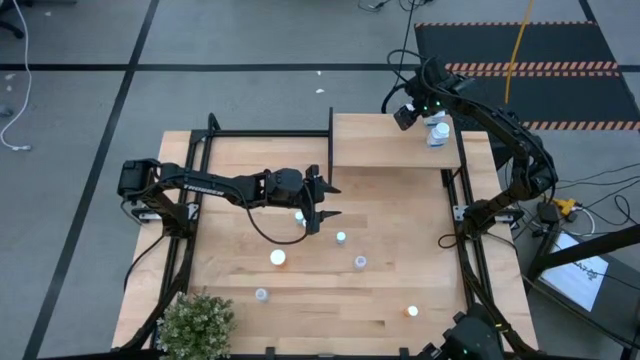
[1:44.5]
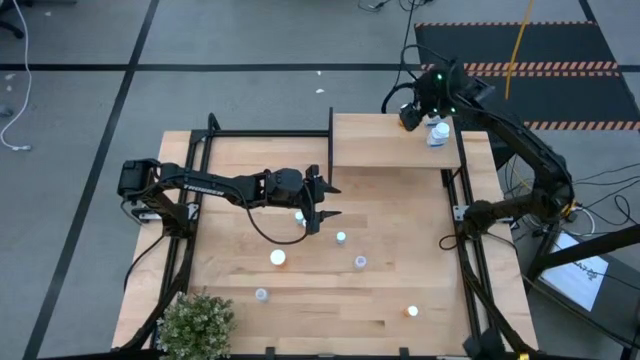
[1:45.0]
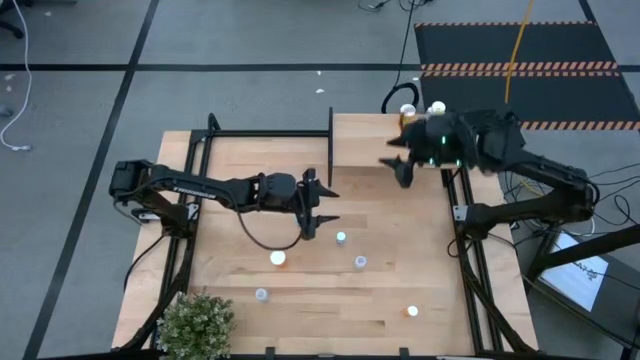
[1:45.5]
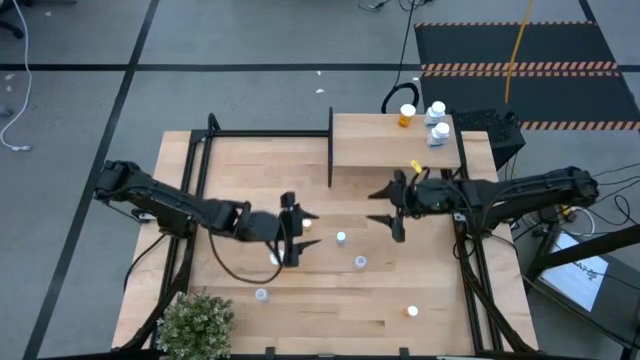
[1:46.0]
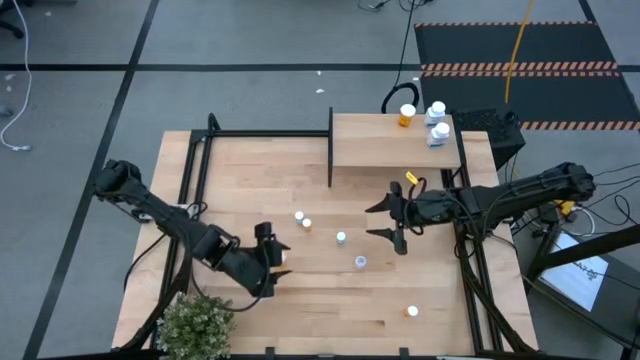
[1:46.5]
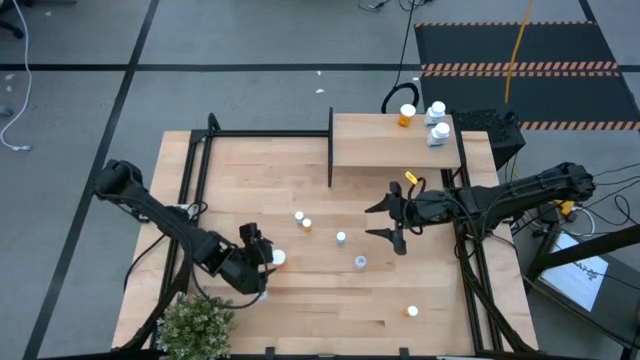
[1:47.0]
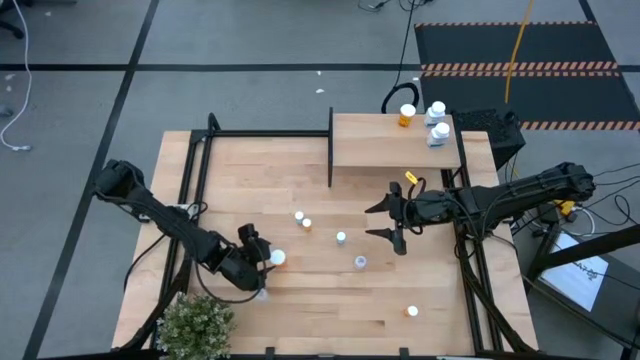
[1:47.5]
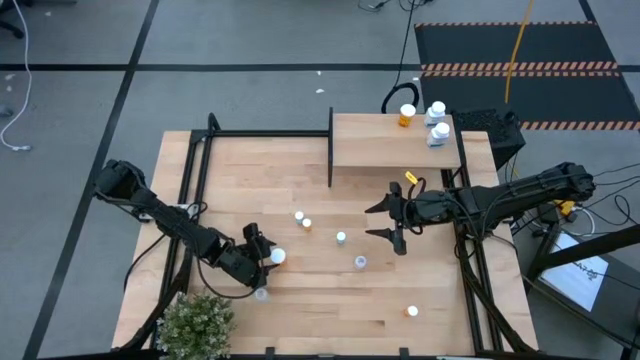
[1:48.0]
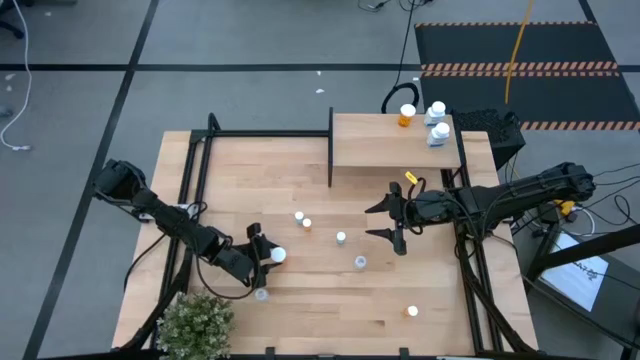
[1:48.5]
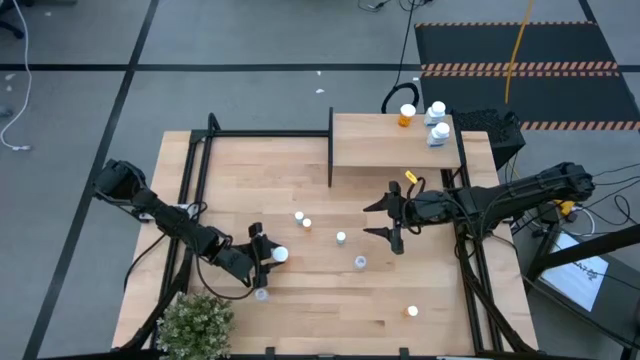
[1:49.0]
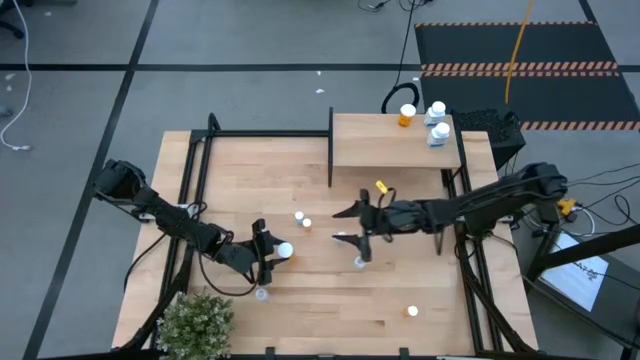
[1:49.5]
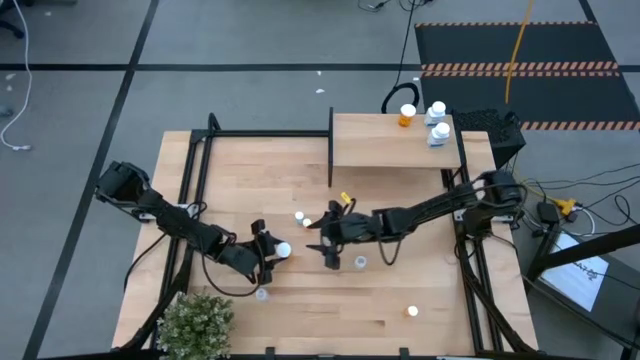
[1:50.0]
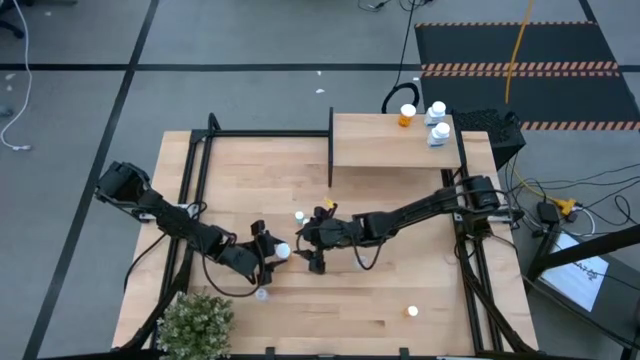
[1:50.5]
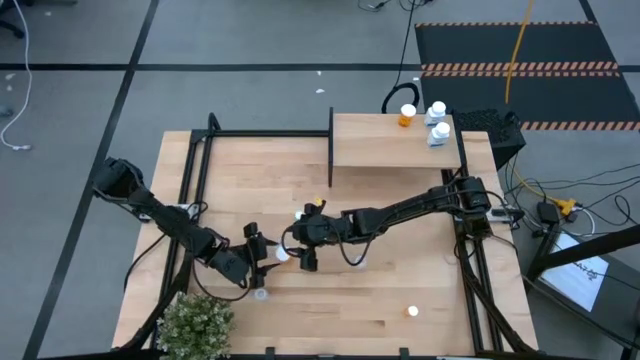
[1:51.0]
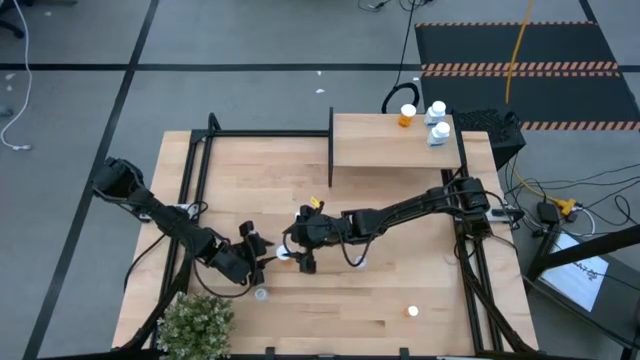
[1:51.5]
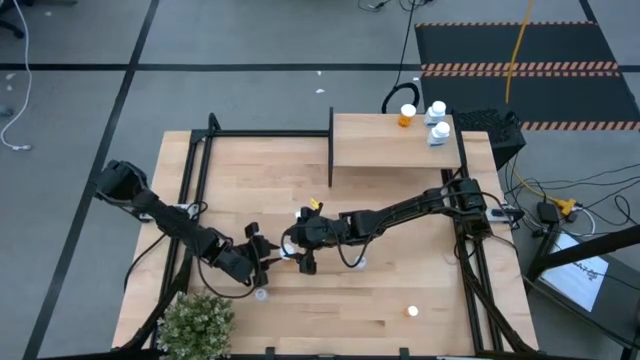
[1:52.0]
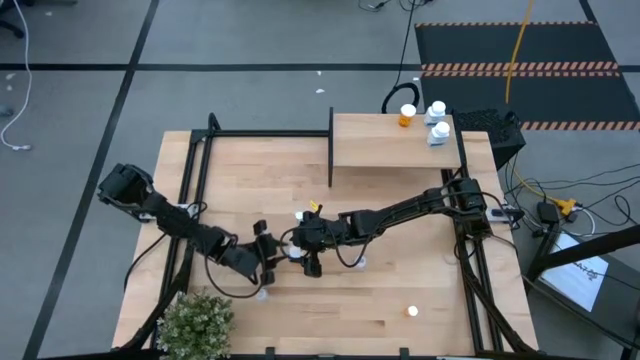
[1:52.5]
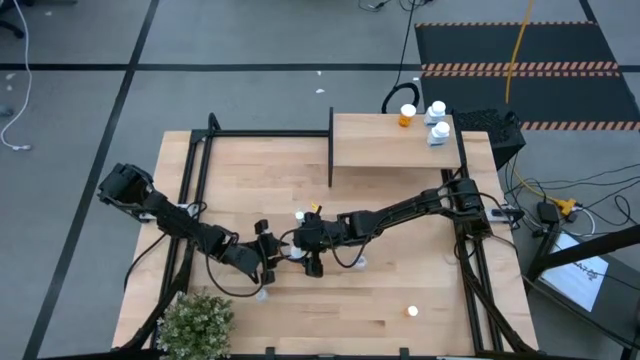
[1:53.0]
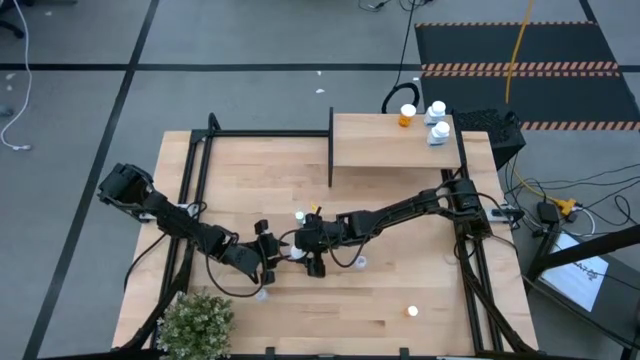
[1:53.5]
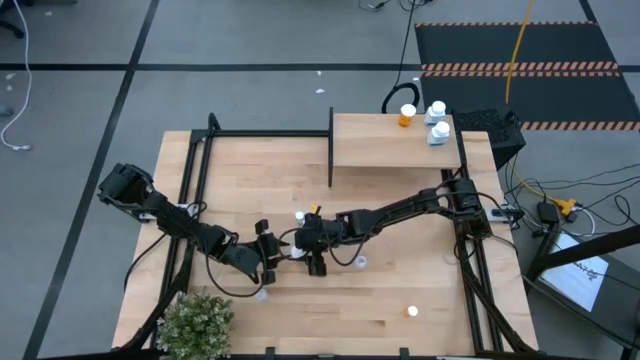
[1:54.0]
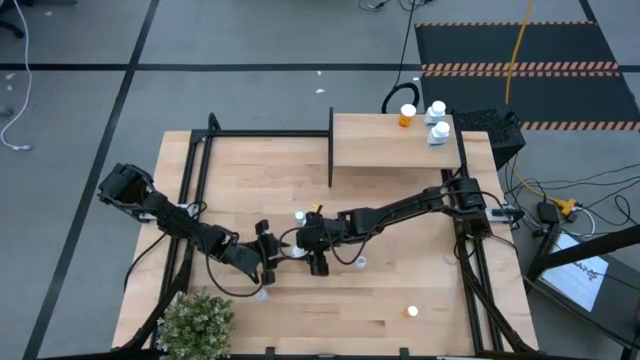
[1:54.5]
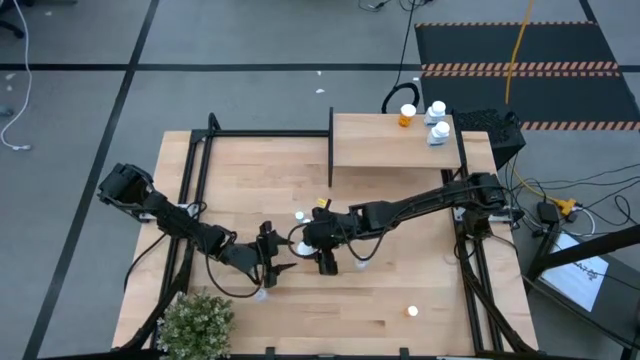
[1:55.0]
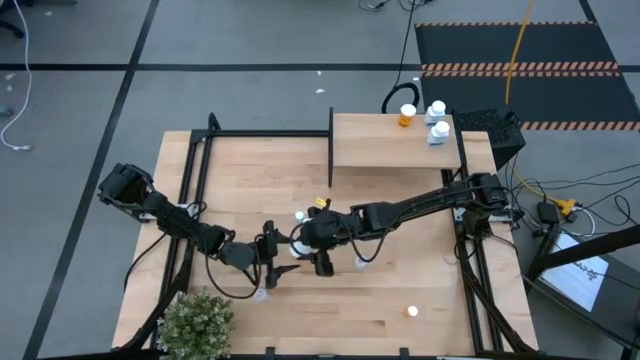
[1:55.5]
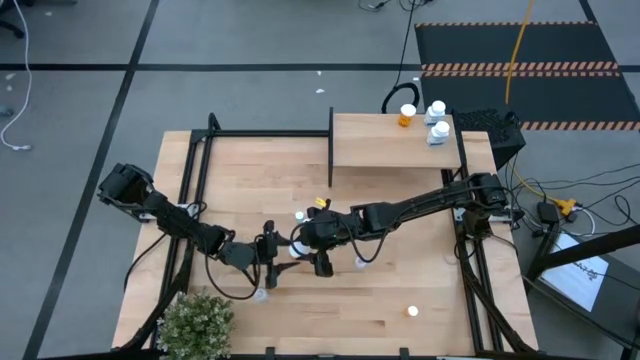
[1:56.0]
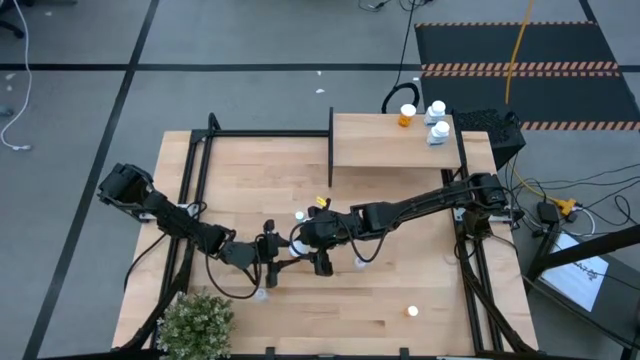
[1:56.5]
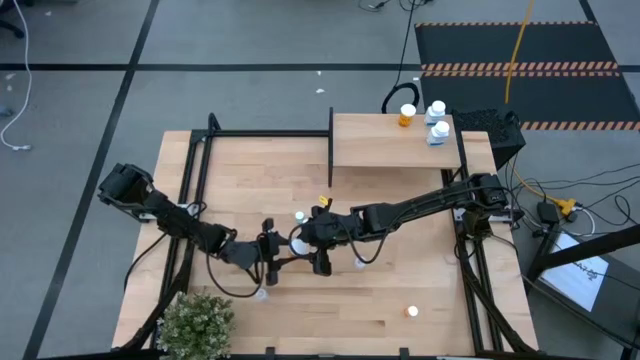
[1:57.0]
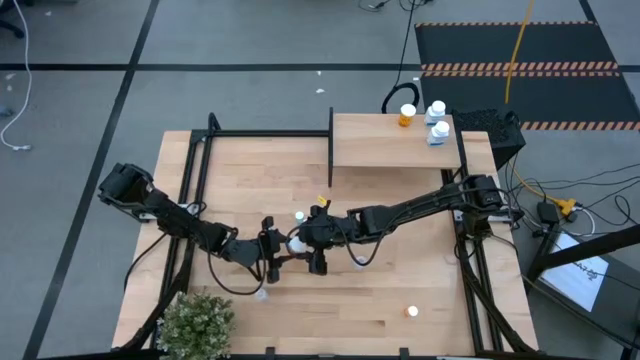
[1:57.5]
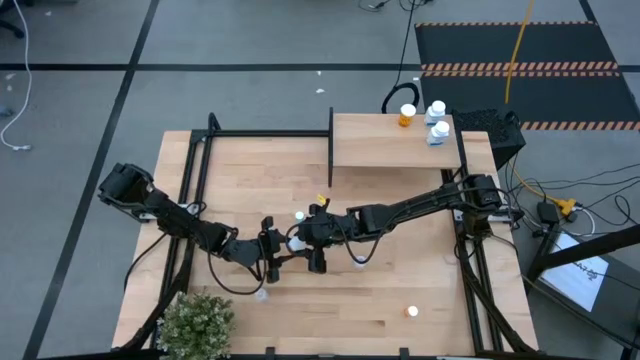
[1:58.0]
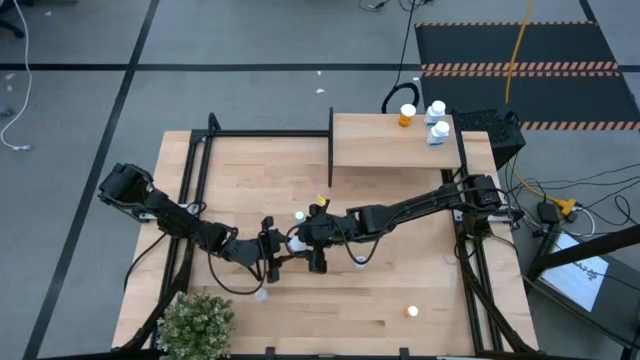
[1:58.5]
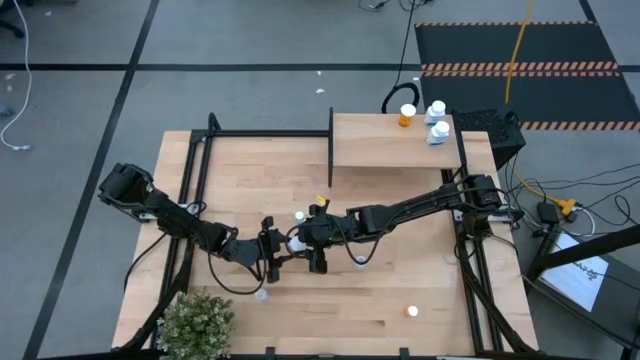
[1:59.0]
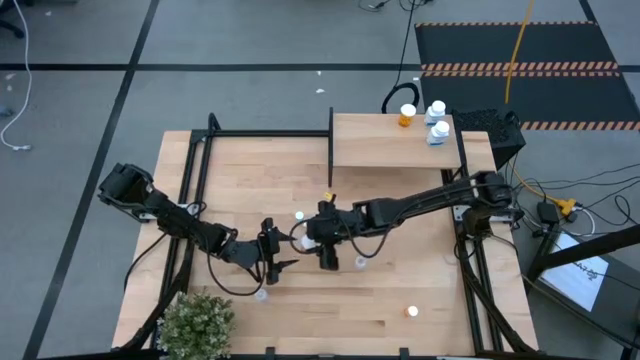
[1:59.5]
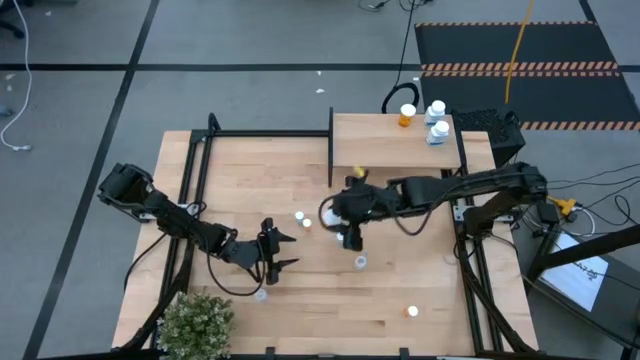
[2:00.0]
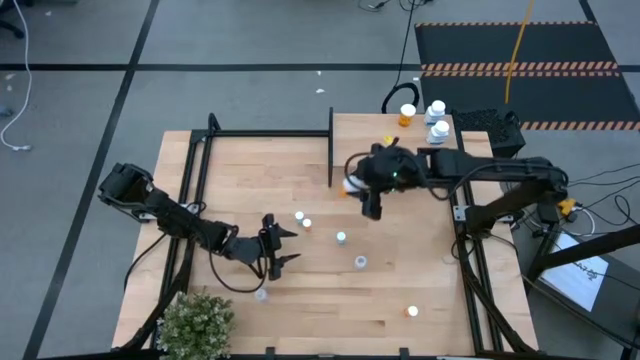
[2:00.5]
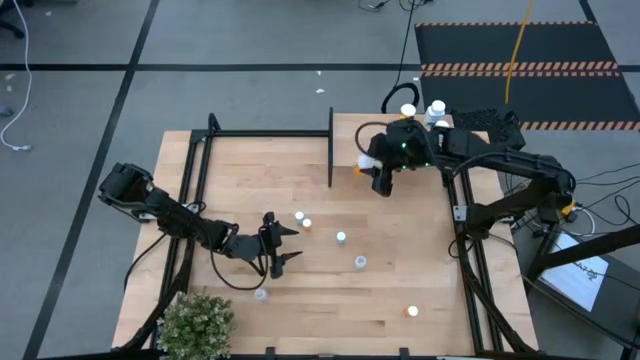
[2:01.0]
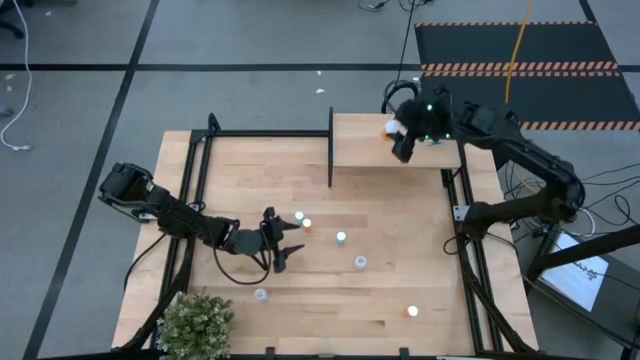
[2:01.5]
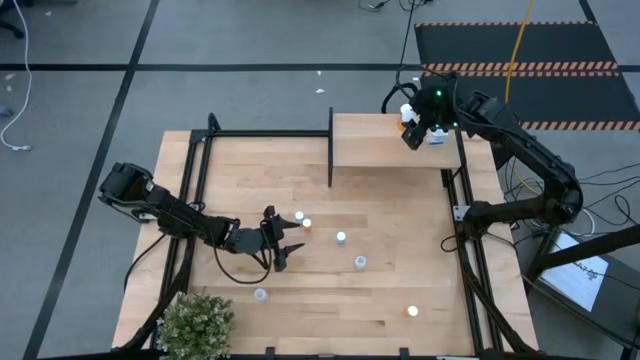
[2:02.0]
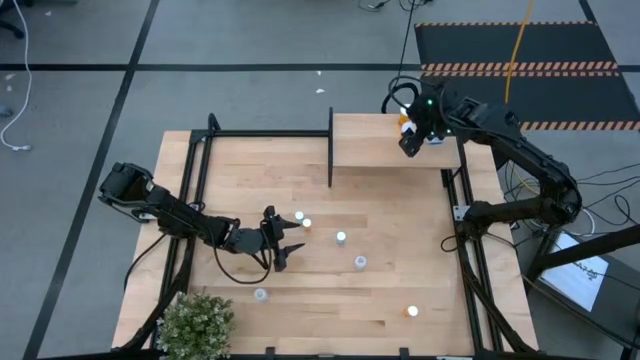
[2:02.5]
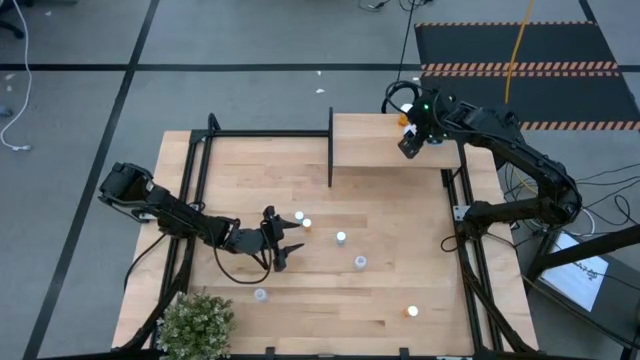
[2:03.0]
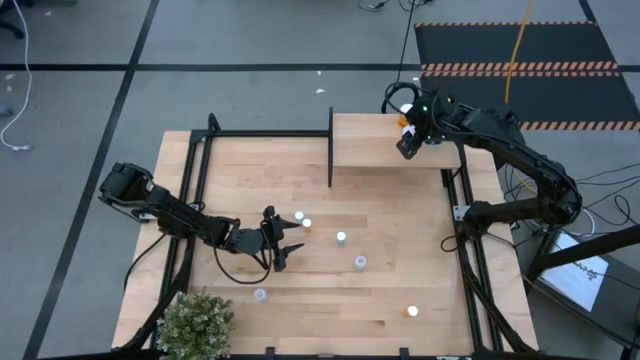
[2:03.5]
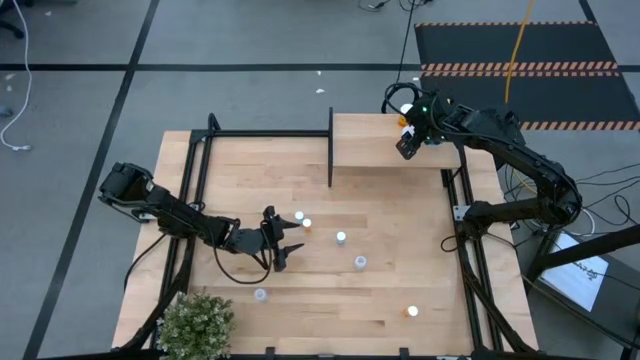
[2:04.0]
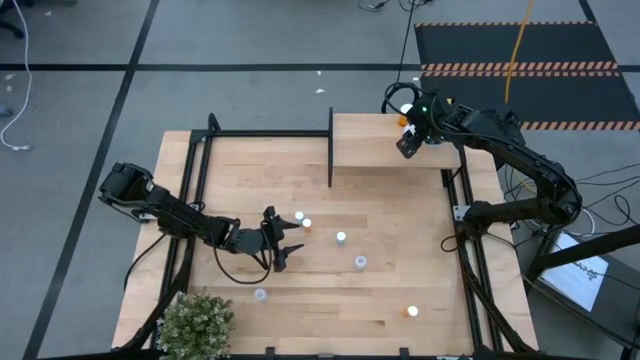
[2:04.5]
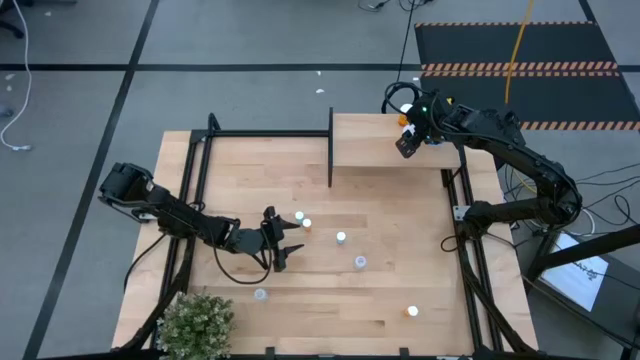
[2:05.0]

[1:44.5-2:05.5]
Task: Pick and place medicine bottles onto shelf by color
Put the large orange pill bottle on the shelf aligned with the other large orange pill bottle
